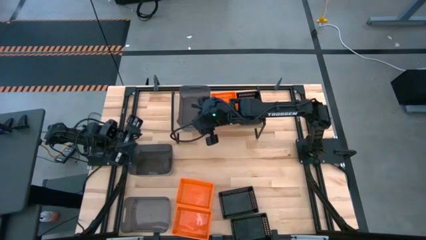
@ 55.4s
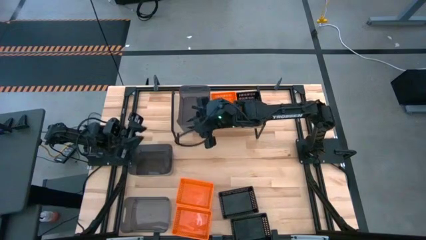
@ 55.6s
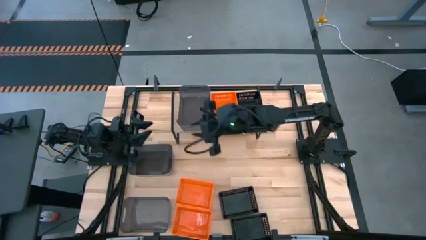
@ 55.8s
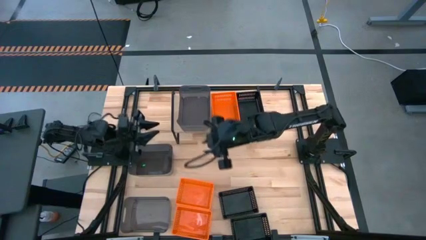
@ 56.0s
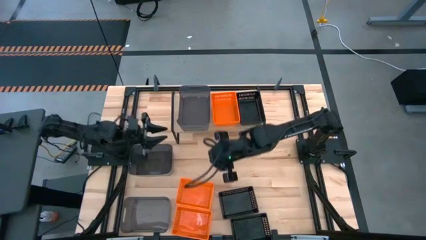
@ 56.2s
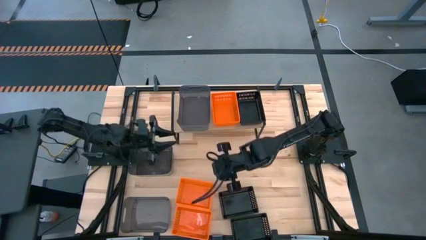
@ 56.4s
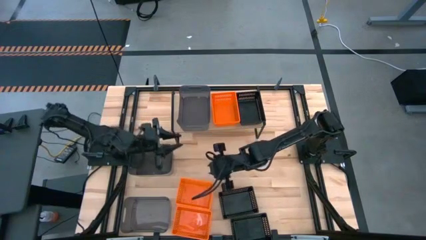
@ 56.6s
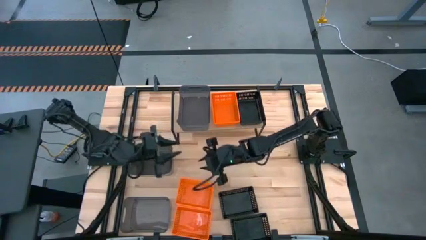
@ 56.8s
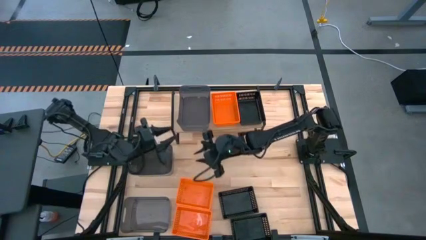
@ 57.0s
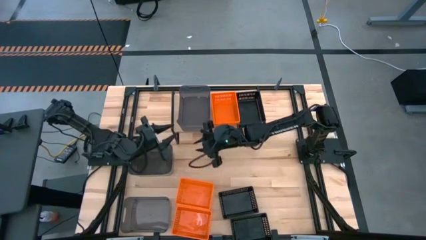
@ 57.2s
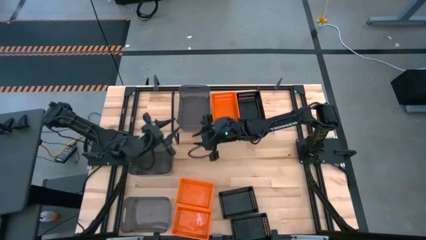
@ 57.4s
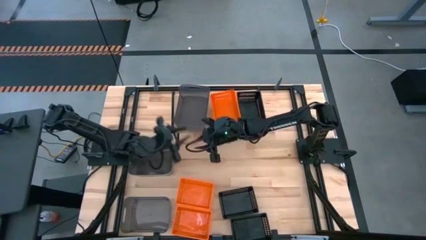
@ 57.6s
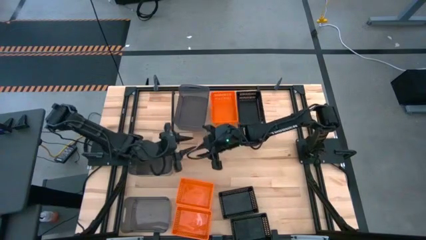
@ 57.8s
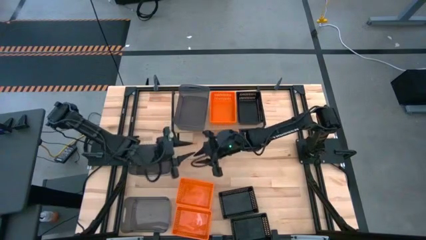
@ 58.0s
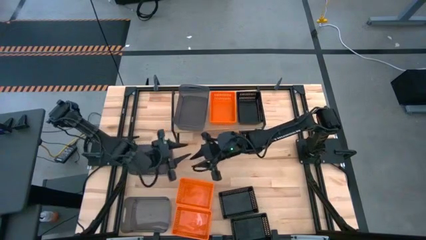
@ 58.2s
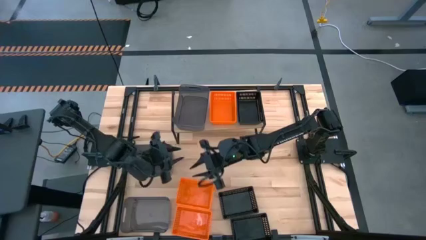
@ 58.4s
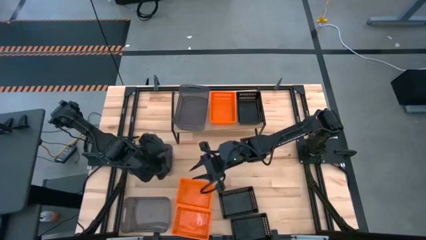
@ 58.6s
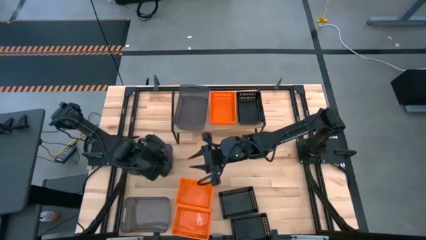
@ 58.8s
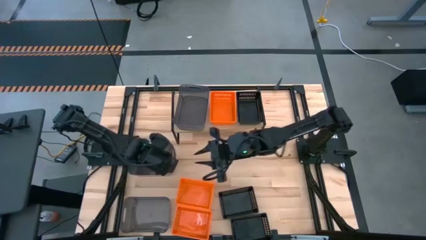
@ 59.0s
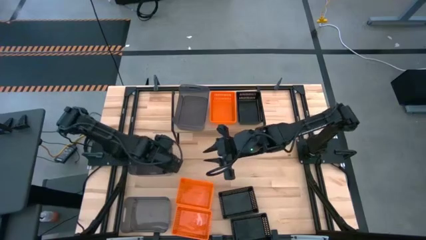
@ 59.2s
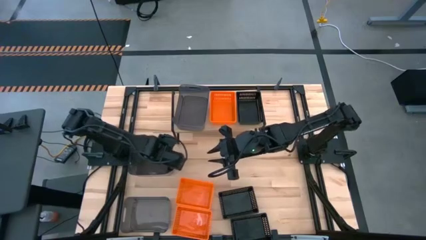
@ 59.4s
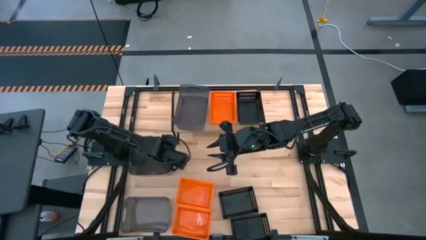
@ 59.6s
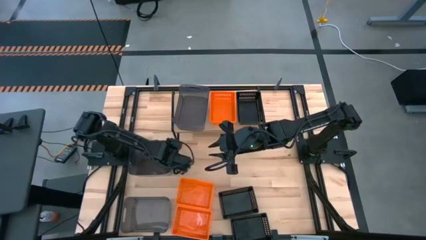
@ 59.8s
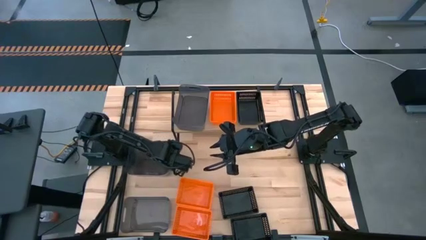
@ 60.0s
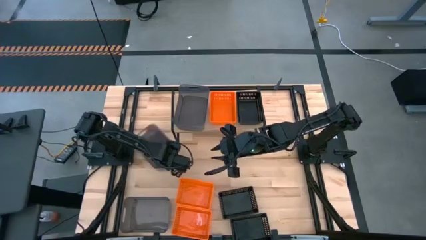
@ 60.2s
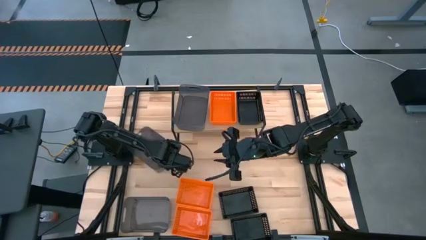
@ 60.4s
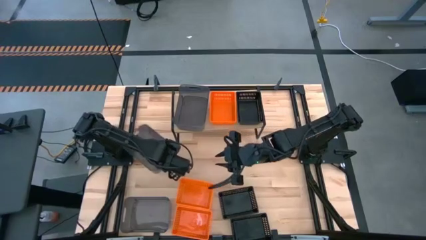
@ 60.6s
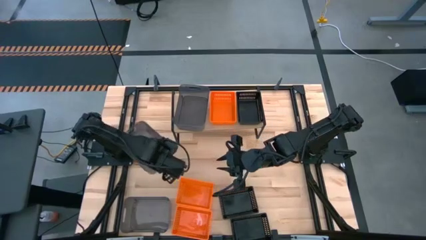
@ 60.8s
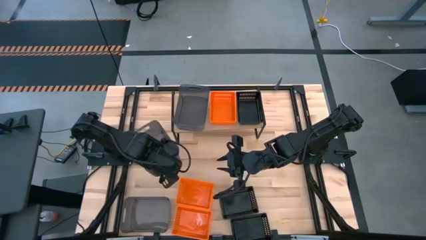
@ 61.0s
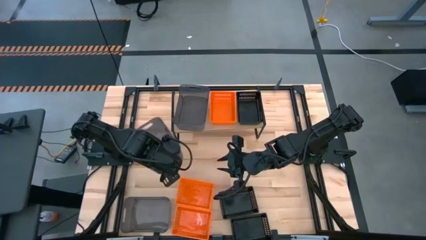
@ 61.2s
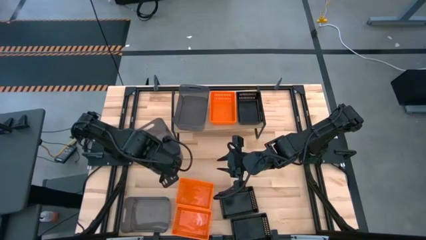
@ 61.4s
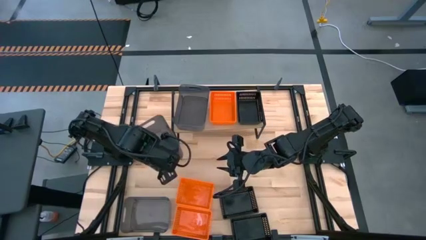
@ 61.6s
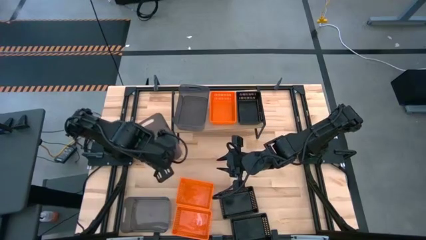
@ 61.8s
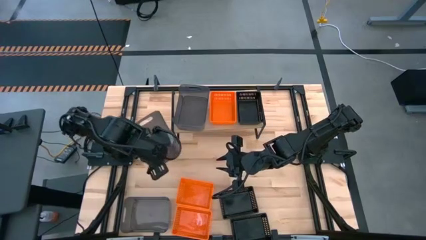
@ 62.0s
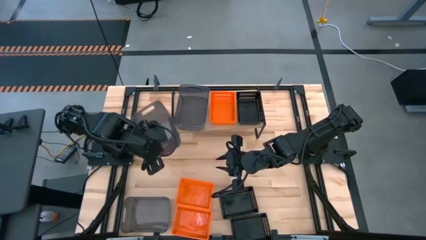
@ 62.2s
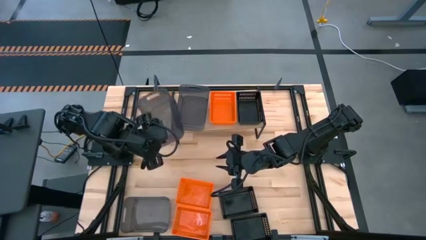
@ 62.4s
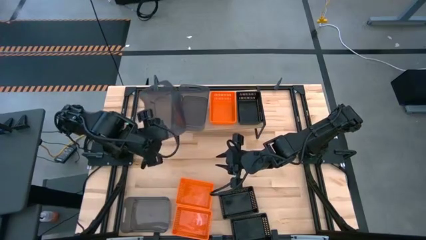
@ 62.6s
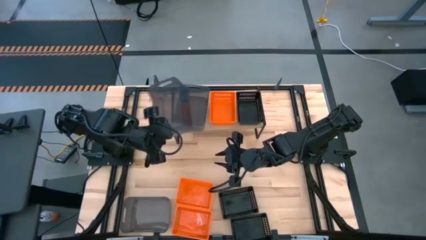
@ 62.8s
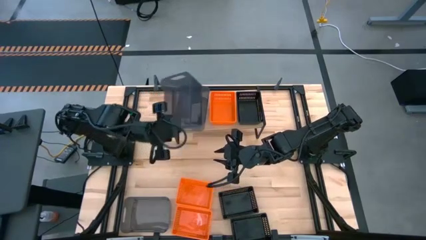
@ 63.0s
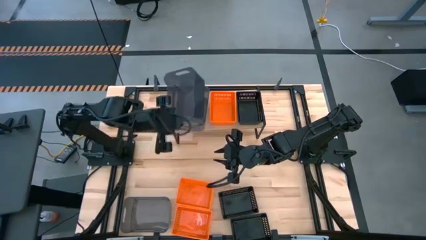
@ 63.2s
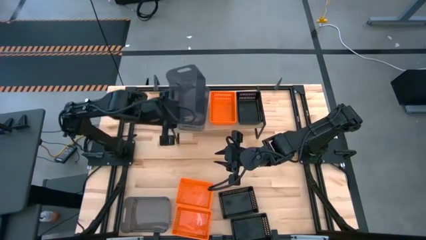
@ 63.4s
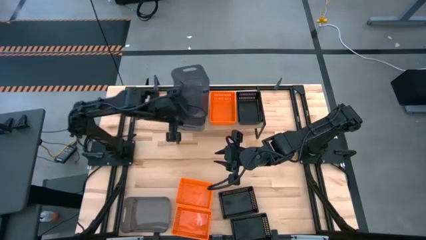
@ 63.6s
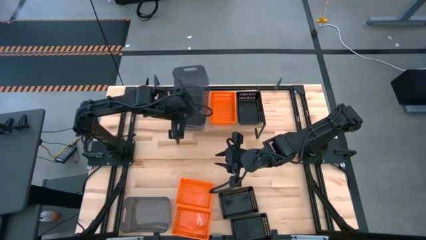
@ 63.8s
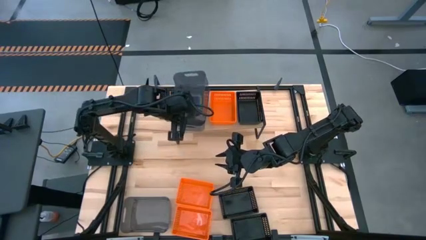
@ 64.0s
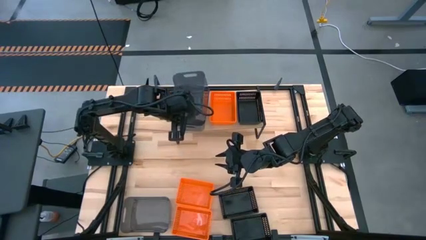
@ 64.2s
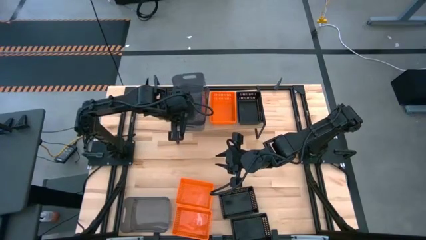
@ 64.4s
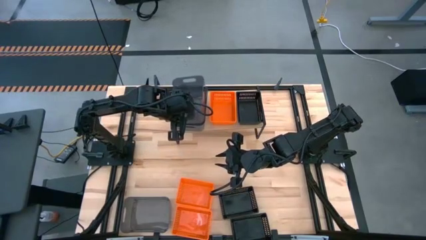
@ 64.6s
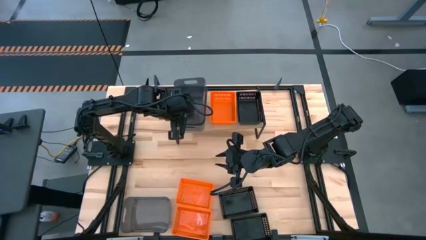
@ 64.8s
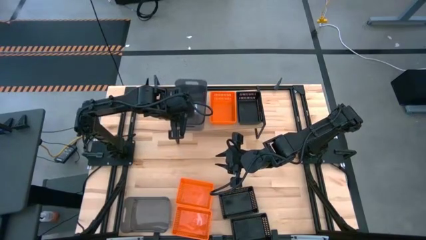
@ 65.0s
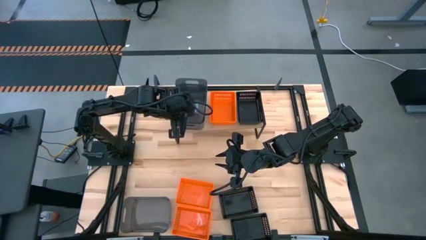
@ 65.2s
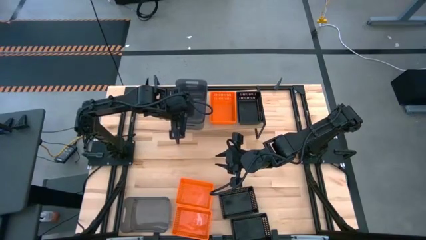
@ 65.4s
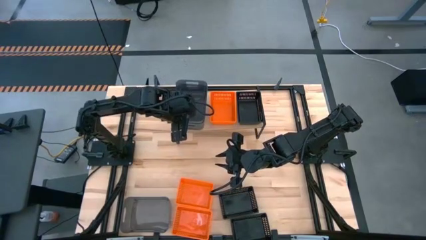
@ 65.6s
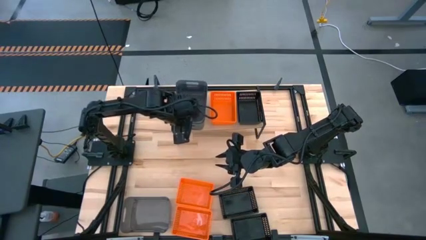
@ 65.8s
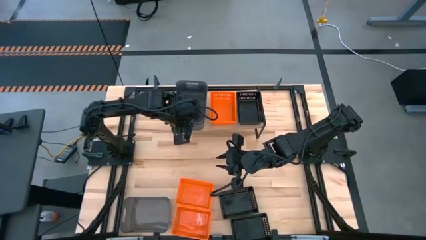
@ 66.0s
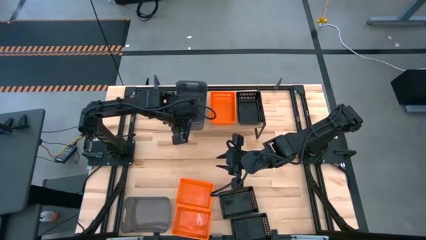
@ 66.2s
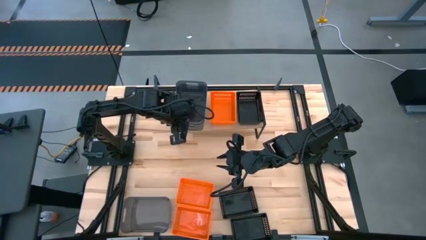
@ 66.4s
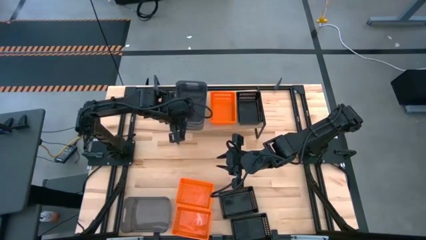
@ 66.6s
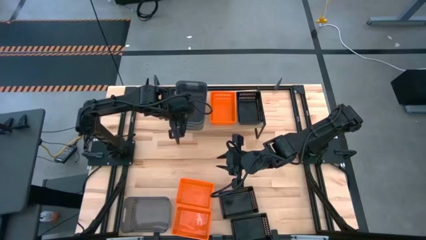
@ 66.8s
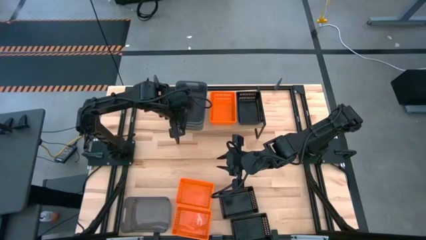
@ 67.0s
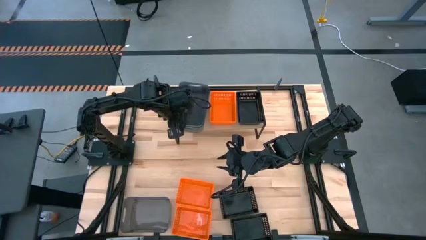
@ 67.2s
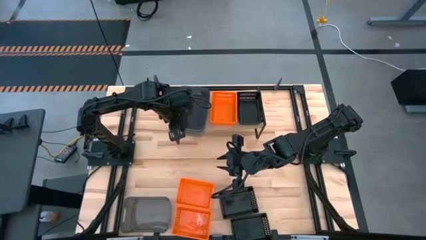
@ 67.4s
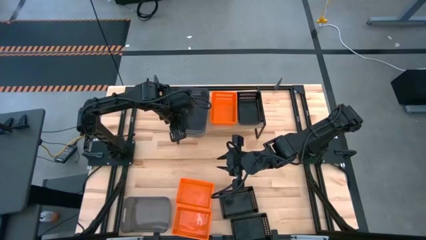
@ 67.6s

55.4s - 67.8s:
Task: Stack baskets on shelf by color
Stack the top black transparent bin on the black transparent bin on the shelf

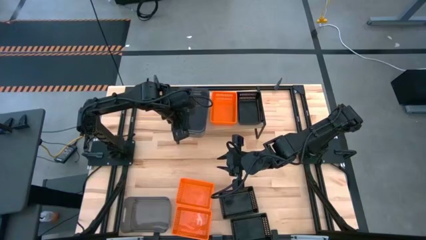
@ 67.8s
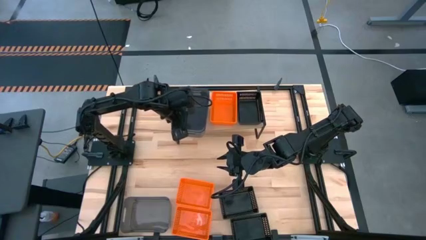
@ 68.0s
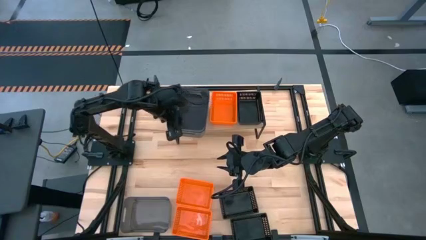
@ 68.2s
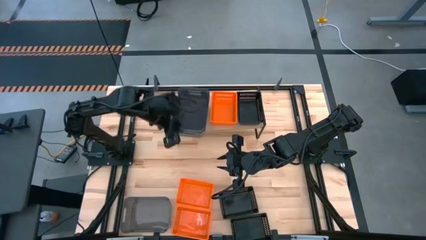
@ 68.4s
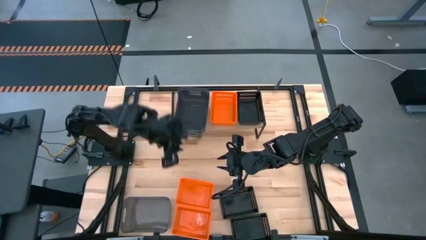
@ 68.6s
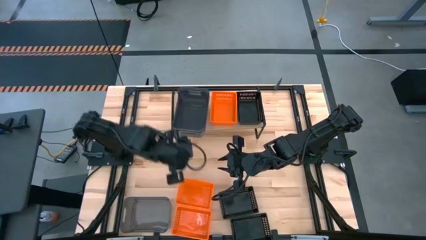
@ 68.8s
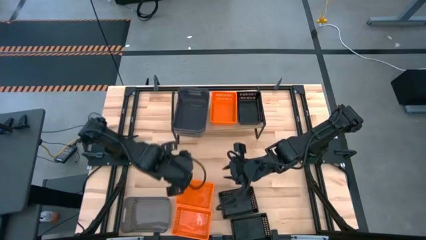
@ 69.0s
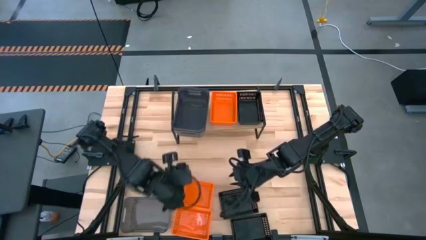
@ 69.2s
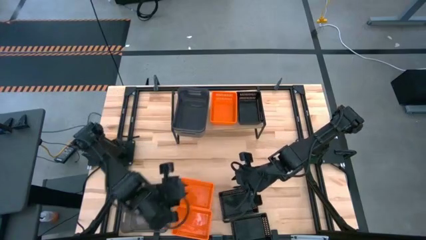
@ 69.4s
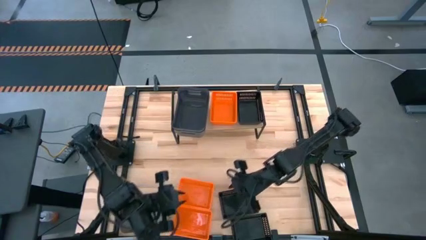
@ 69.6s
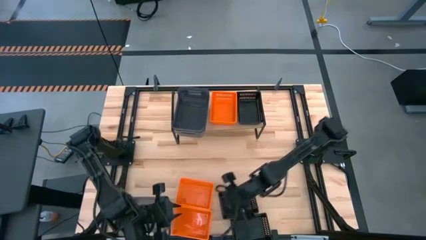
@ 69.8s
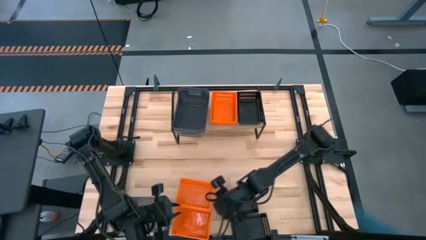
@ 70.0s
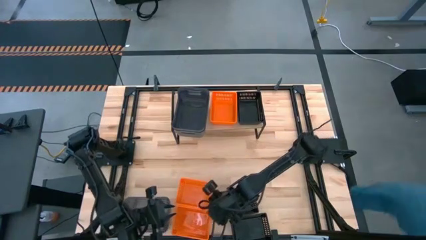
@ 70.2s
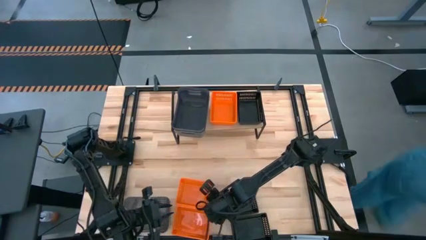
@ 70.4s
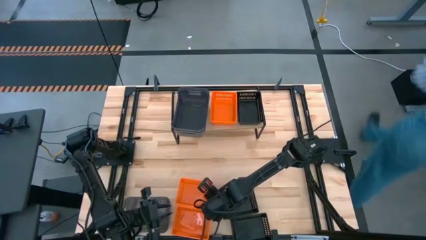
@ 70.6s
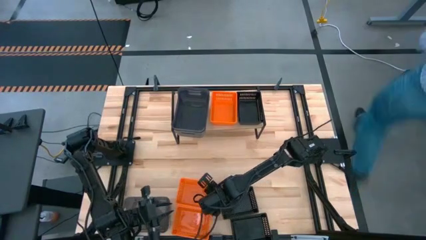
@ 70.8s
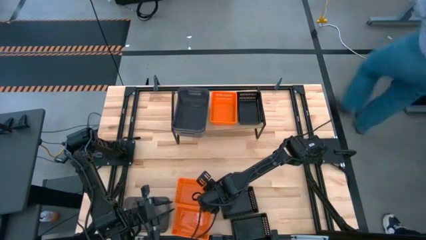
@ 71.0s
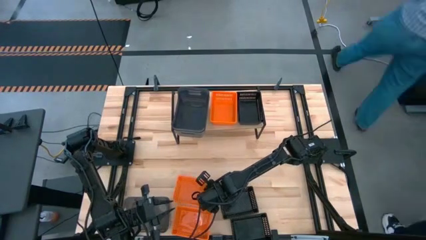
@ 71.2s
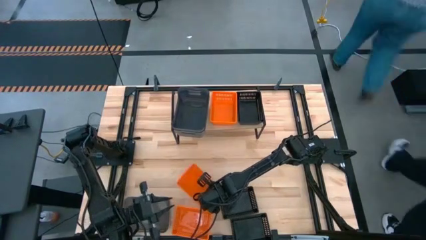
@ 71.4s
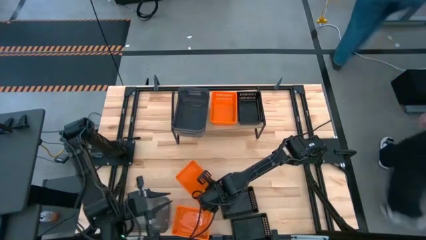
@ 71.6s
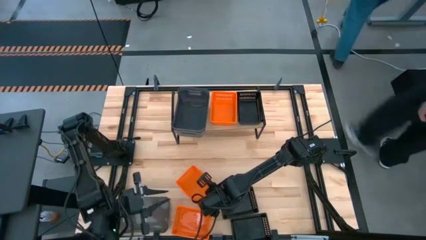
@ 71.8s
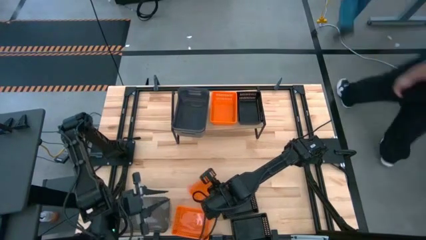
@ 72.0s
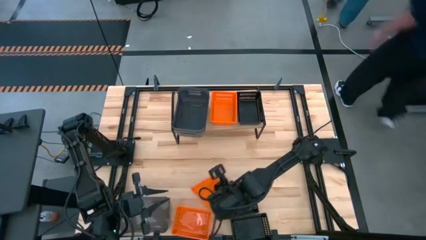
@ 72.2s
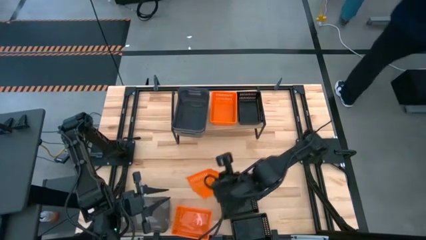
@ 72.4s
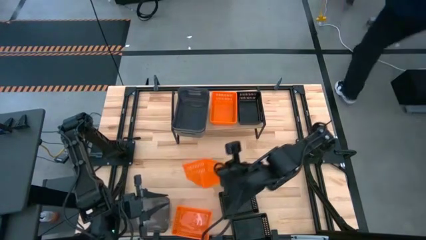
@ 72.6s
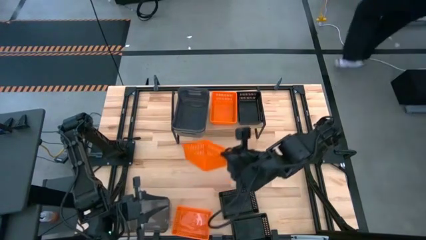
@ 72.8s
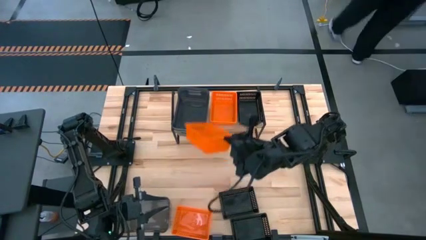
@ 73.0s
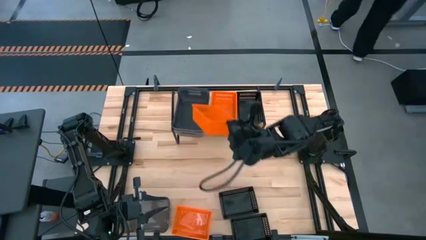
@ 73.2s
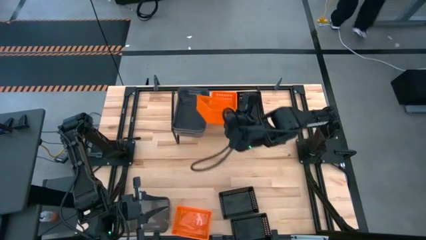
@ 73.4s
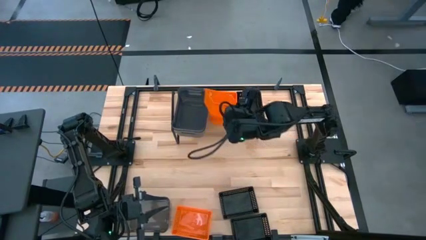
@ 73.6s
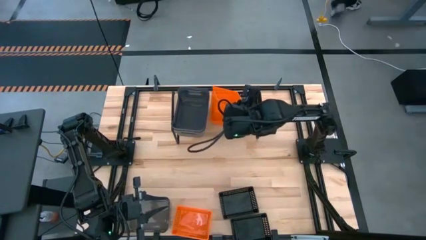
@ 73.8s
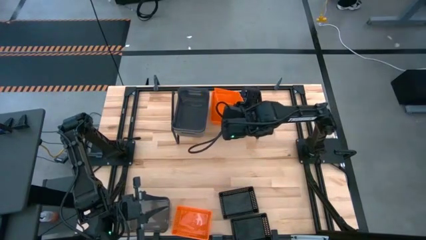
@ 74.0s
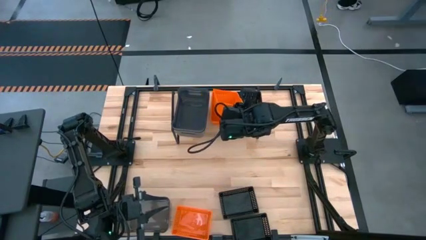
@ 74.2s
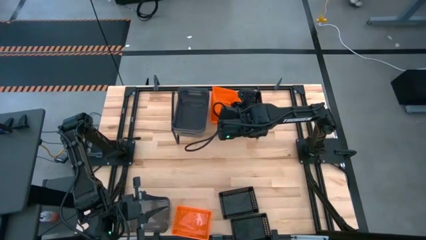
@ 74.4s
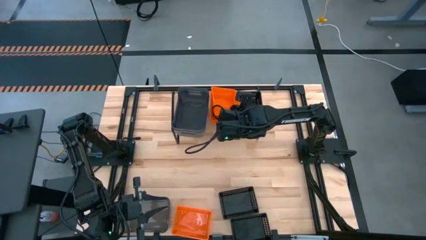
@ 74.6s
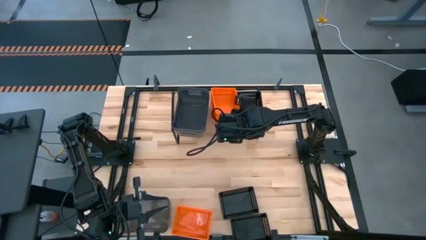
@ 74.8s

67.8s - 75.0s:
Stack the top orange bin on the top orange bin on the shelf
